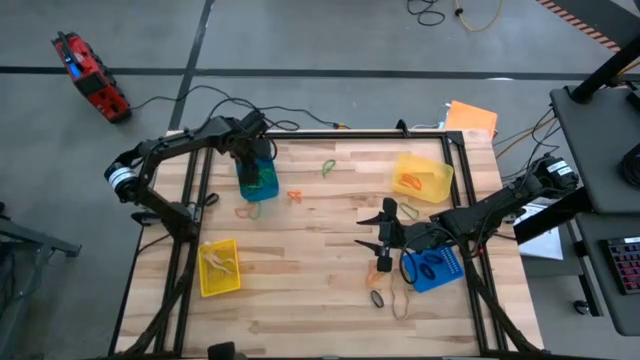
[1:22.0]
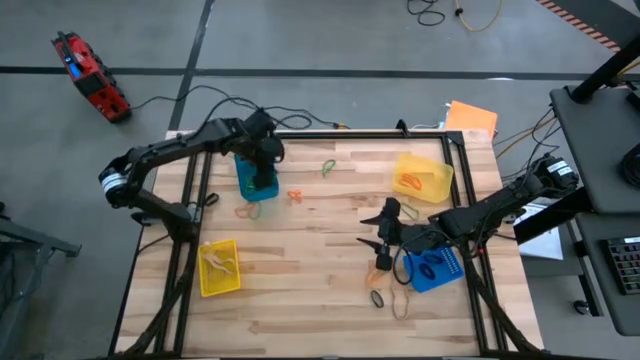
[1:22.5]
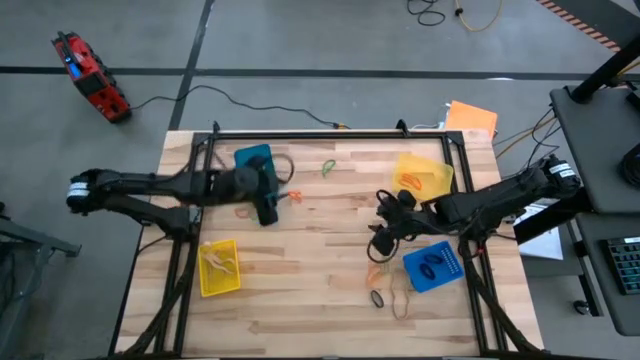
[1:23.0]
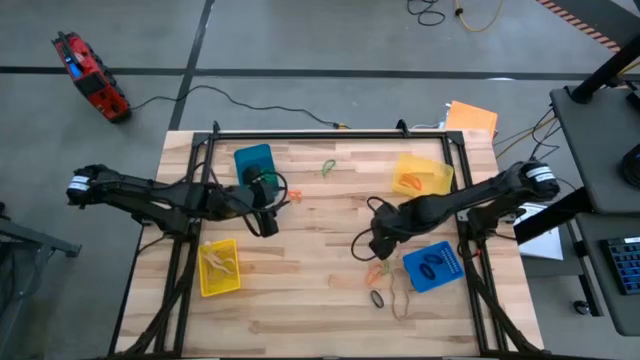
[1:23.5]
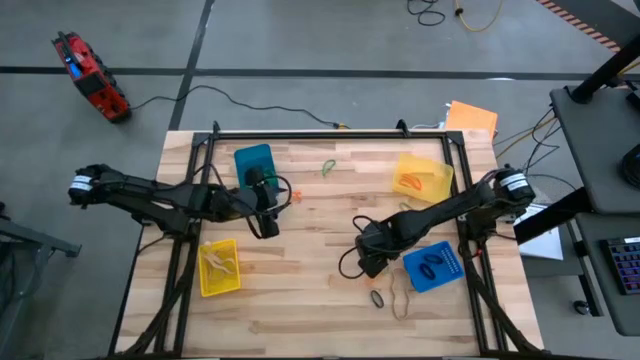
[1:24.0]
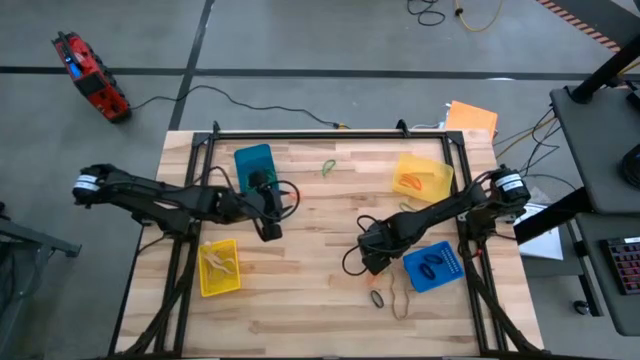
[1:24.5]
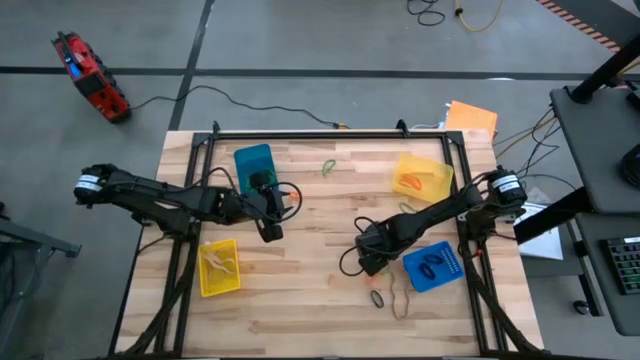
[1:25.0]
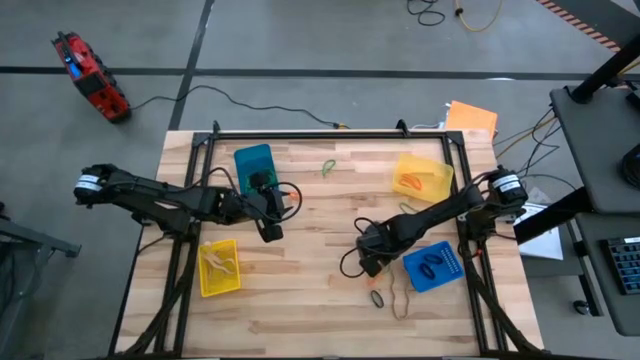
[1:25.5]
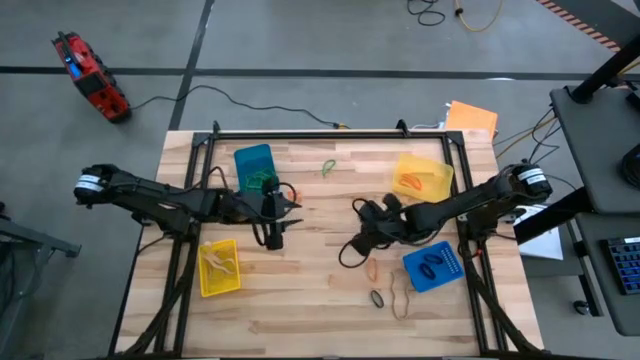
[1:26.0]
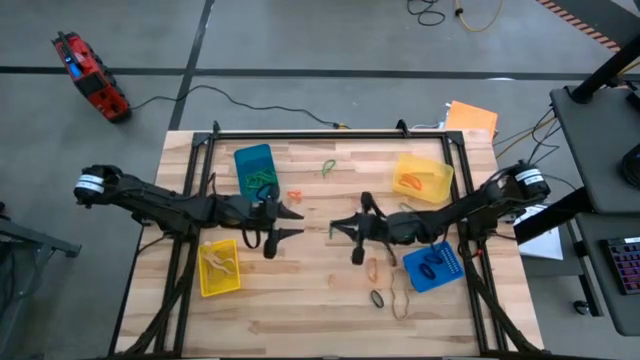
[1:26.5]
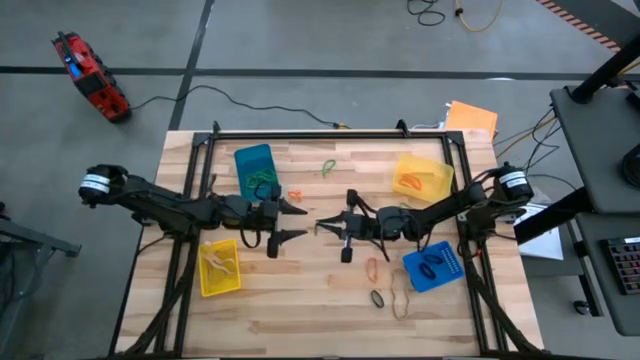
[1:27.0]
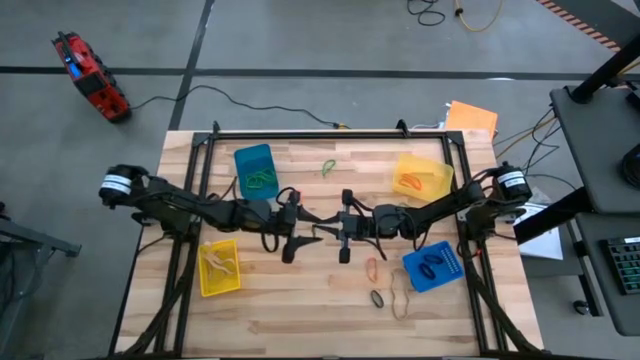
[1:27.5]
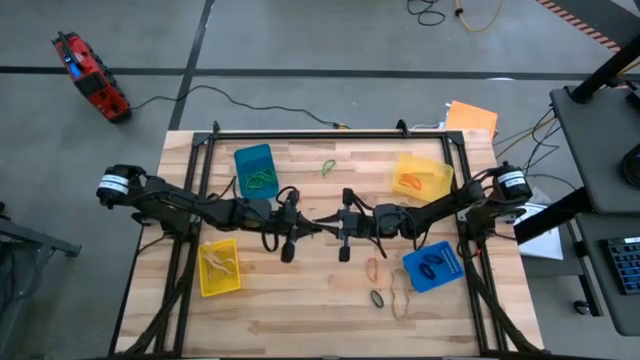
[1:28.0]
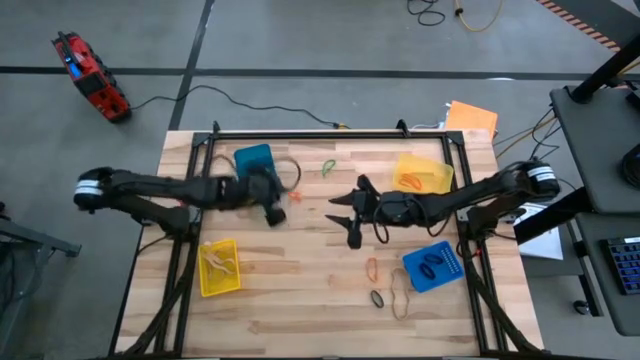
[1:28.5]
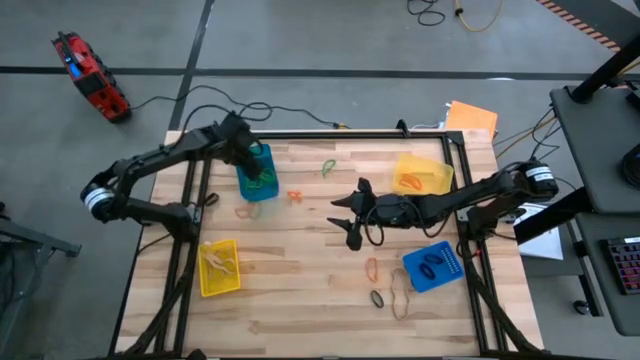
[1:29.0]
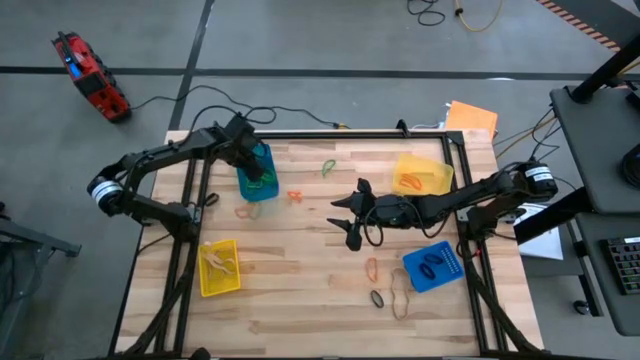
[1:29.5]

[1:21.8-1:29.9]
Task: Sort rubber bands into baskets
Put the green rubber band into the light blue bin

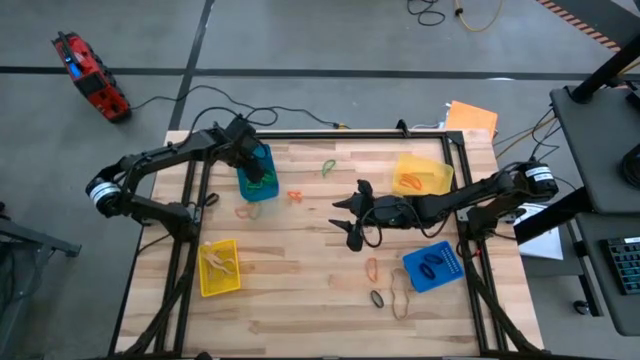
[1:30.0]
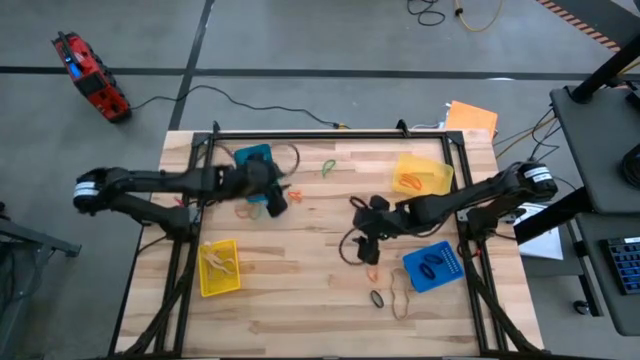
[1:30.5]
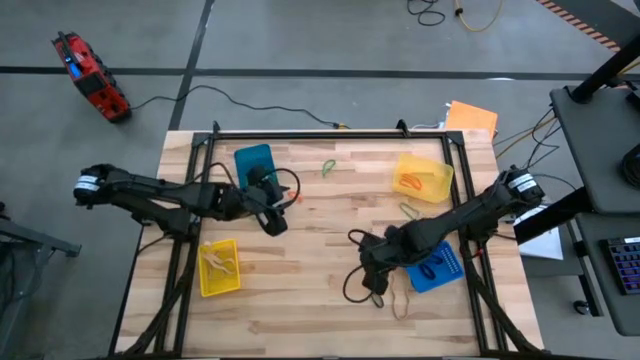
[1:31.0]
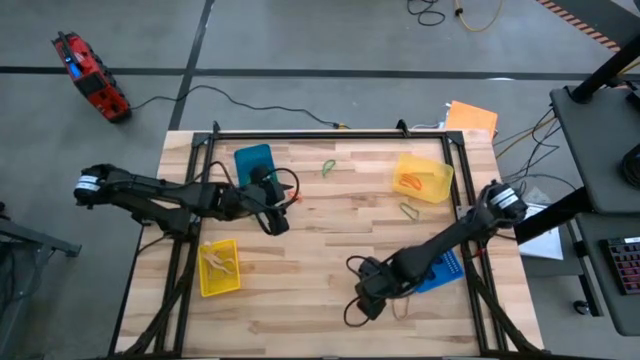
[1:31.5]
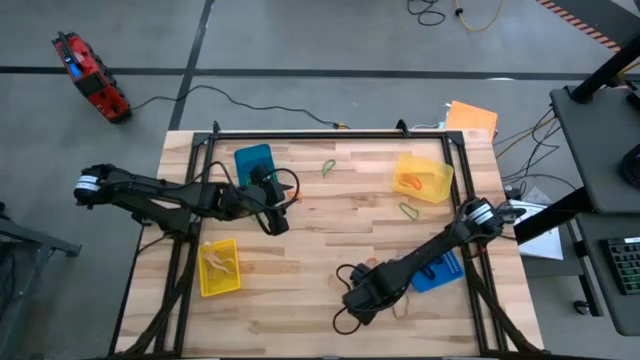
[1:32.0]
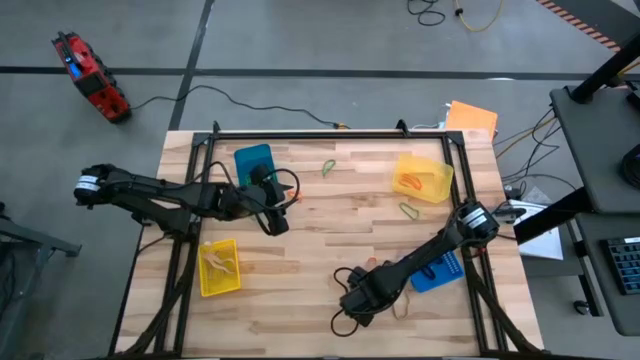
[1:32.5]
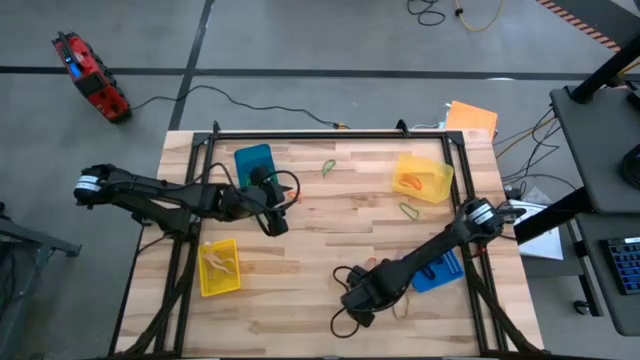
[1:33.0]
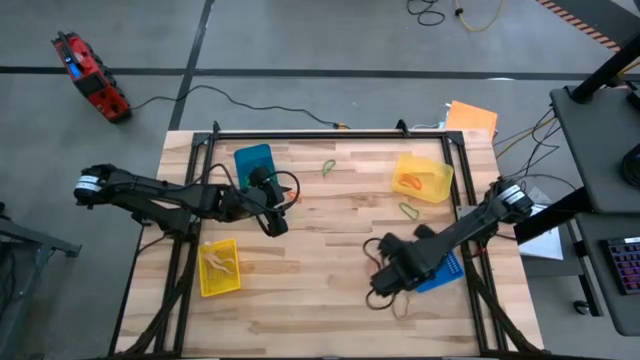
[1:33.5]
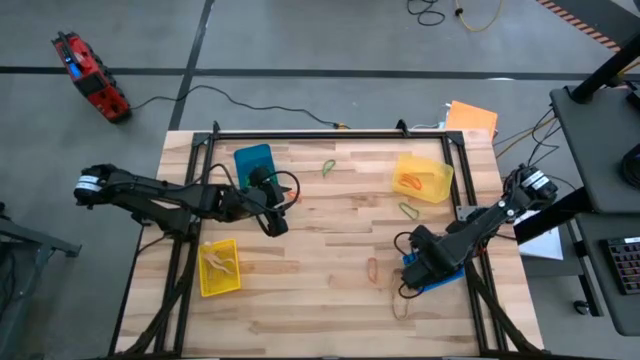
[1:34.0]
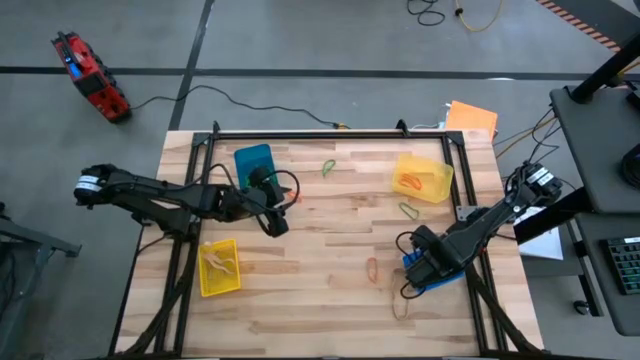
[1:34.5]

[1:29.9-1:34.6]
Put the black rubber band into the bottom blue bin

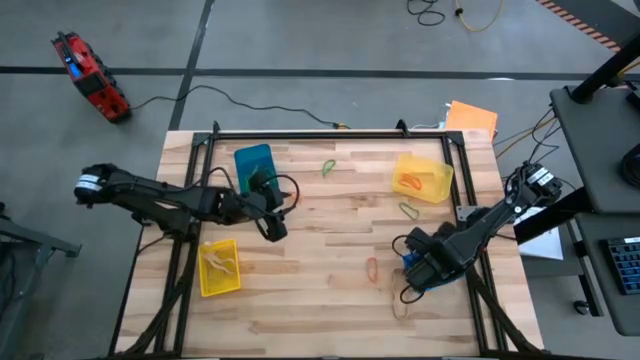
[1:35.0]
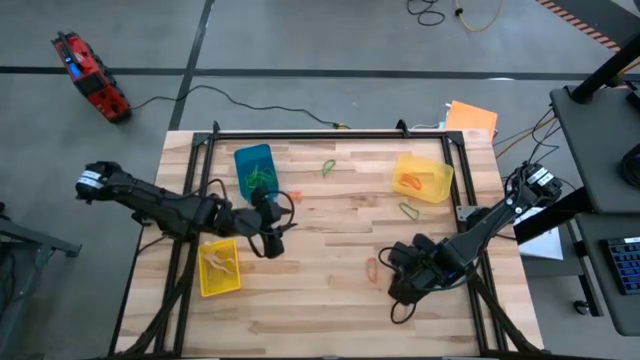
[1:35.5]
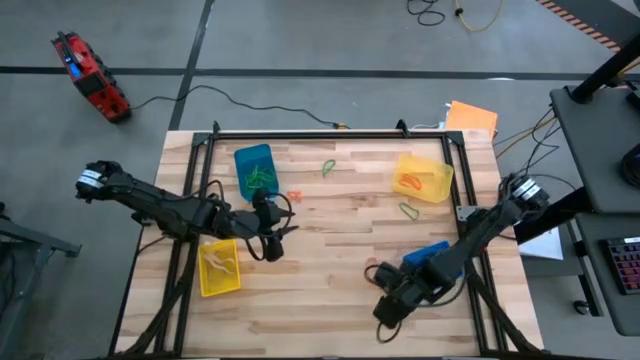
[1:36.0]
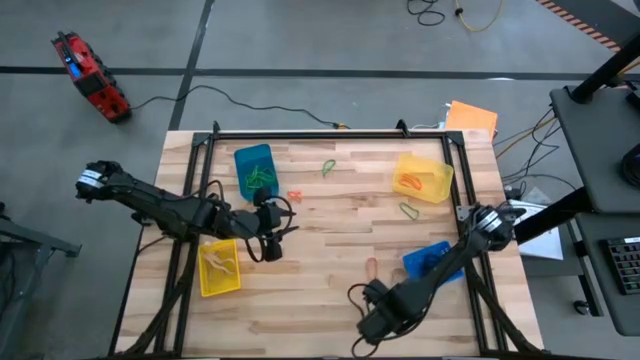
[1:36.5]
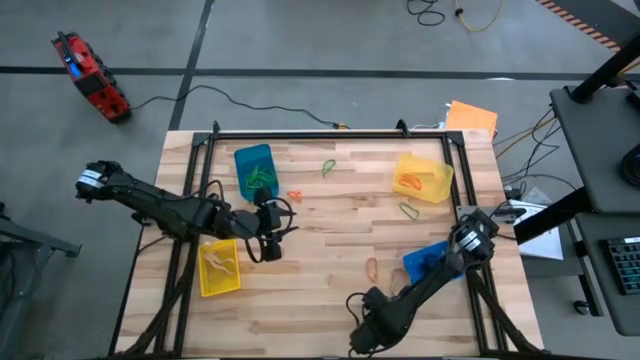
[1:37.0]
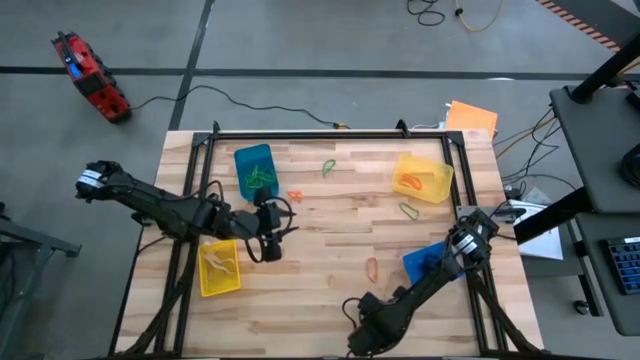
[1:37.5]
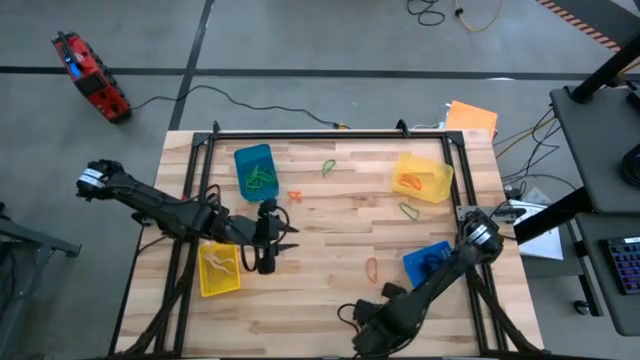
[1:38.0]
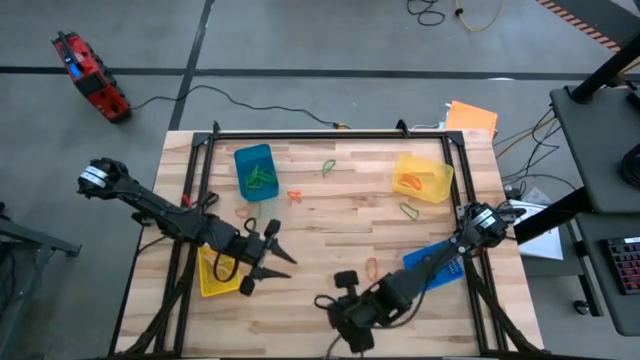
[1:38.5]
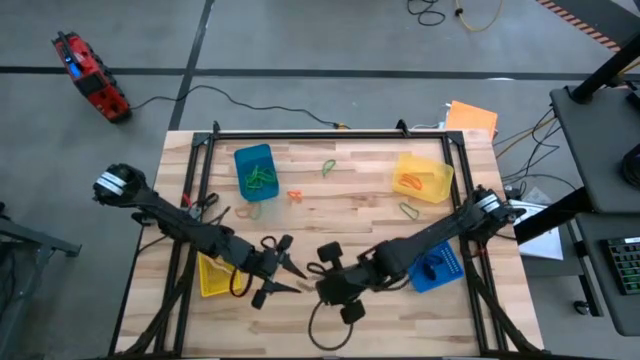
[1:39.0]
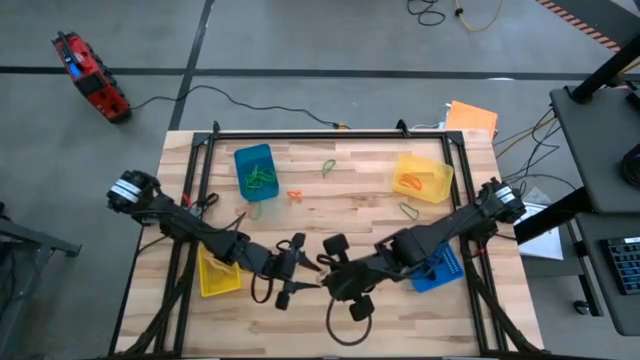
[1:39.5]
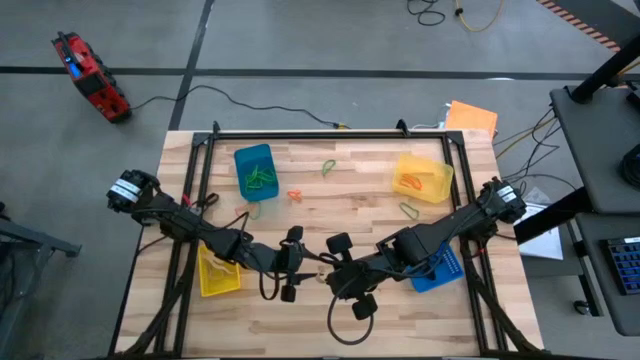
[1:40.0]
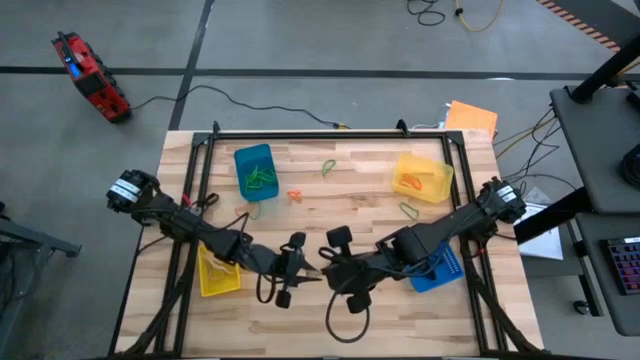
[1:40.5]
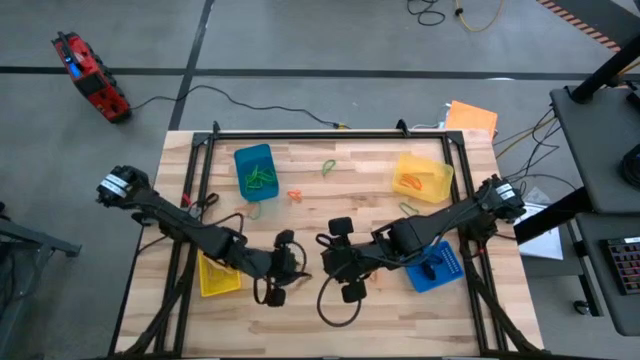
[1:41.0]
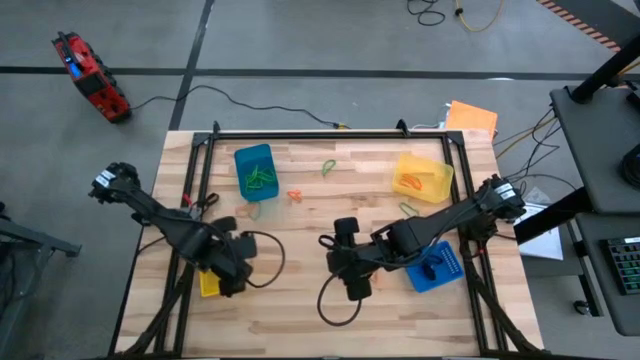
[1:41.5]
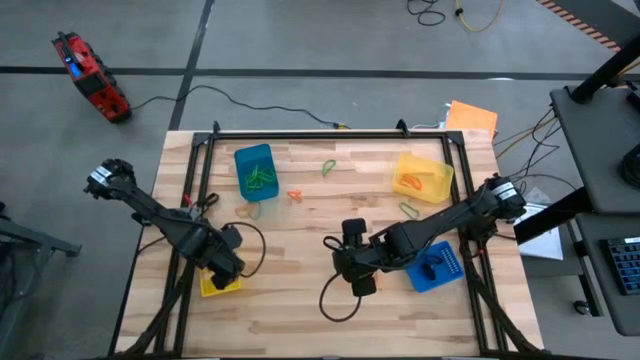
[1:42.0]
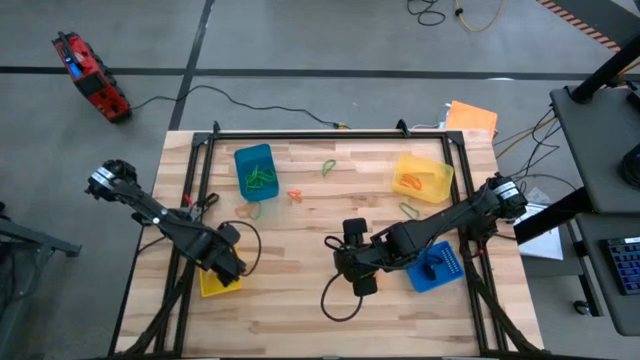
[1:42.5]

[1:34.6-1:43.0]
Put the brown rubber band into the bottom yellow bin
